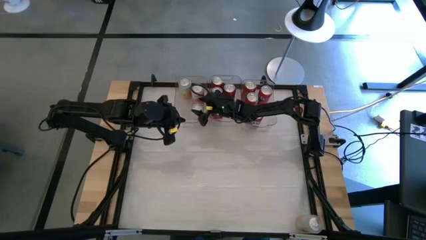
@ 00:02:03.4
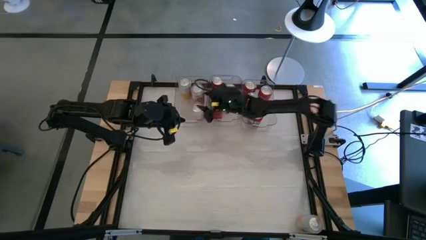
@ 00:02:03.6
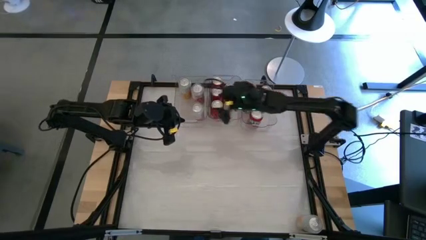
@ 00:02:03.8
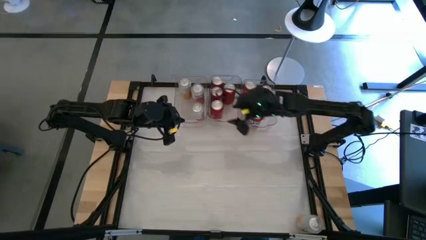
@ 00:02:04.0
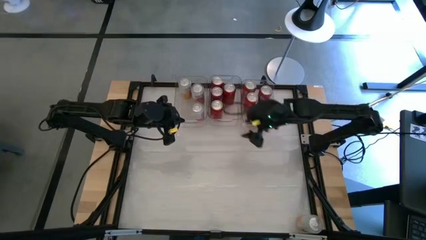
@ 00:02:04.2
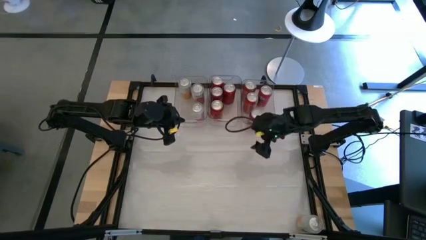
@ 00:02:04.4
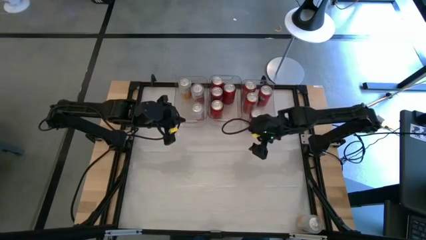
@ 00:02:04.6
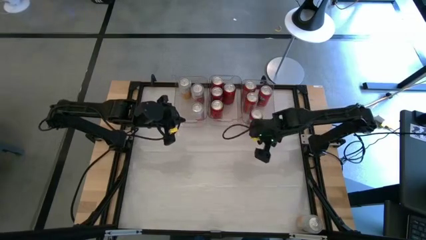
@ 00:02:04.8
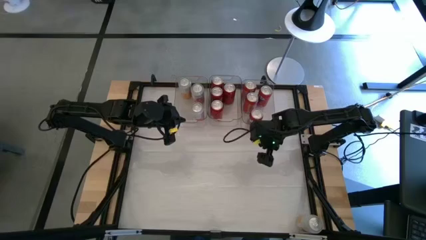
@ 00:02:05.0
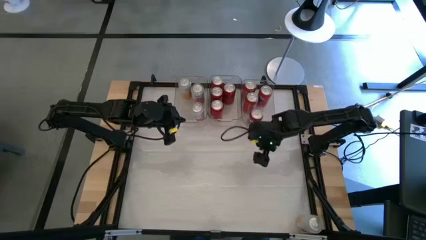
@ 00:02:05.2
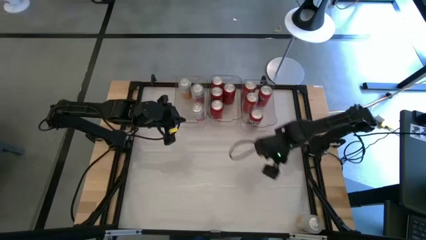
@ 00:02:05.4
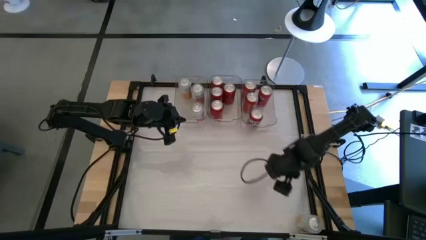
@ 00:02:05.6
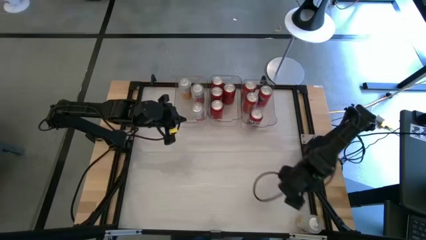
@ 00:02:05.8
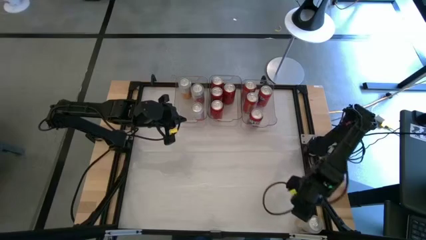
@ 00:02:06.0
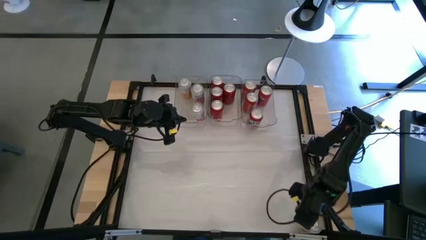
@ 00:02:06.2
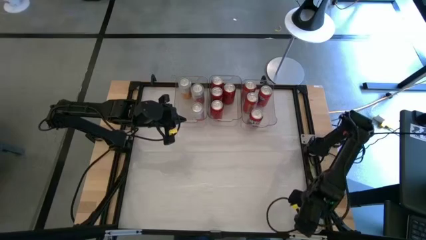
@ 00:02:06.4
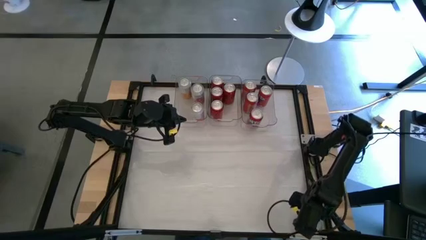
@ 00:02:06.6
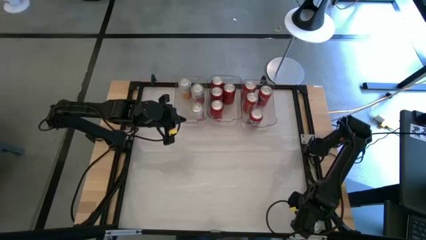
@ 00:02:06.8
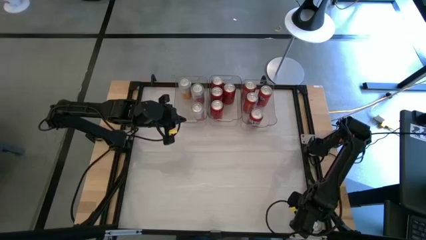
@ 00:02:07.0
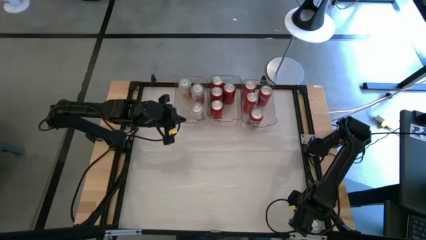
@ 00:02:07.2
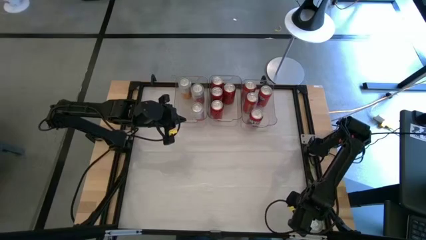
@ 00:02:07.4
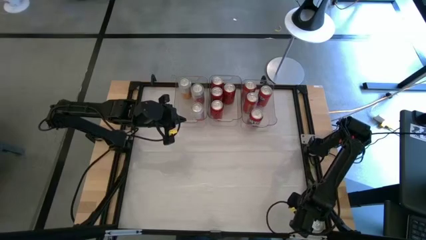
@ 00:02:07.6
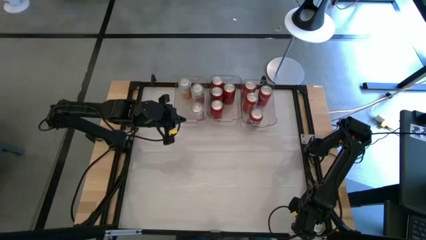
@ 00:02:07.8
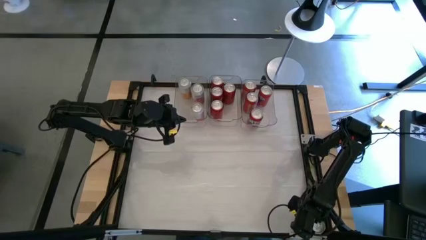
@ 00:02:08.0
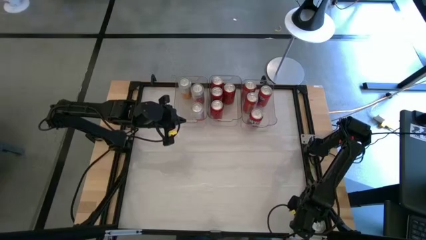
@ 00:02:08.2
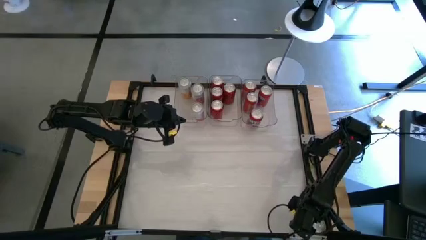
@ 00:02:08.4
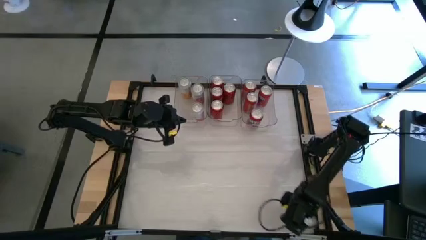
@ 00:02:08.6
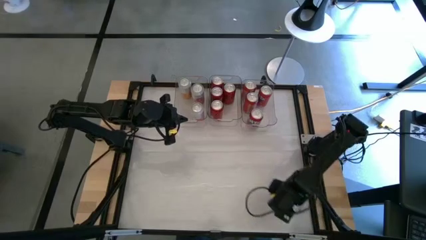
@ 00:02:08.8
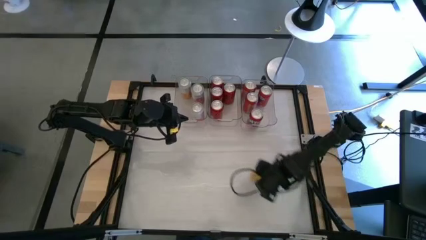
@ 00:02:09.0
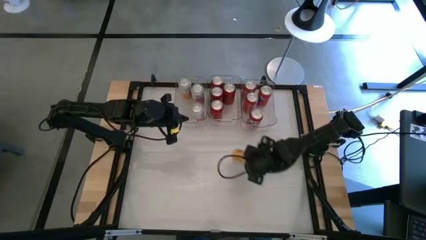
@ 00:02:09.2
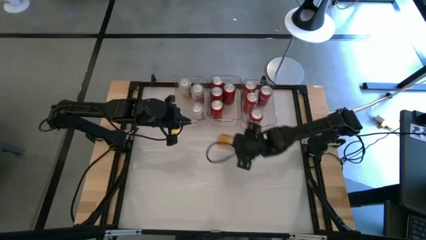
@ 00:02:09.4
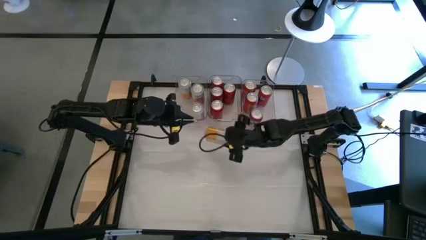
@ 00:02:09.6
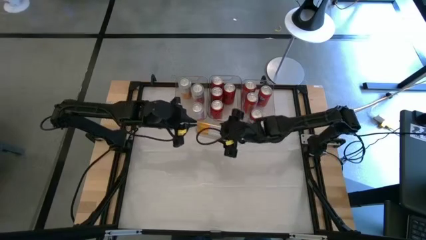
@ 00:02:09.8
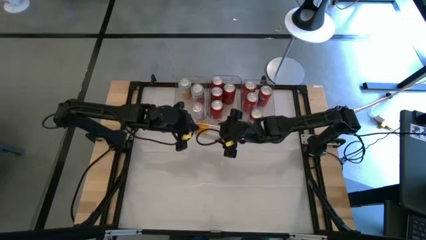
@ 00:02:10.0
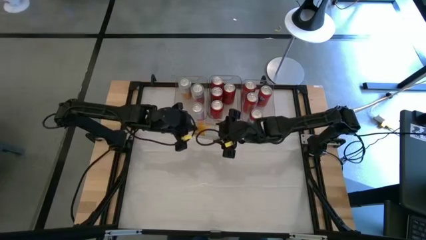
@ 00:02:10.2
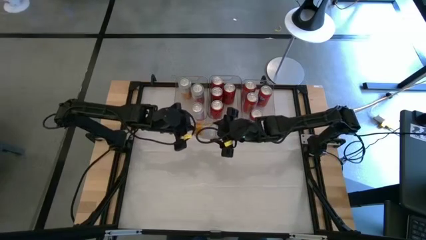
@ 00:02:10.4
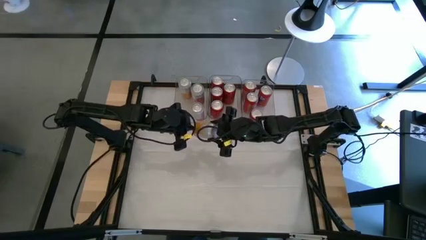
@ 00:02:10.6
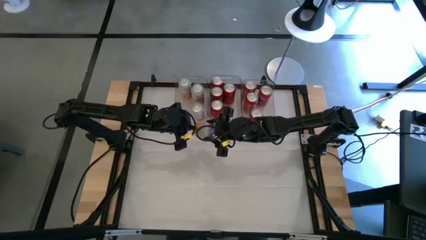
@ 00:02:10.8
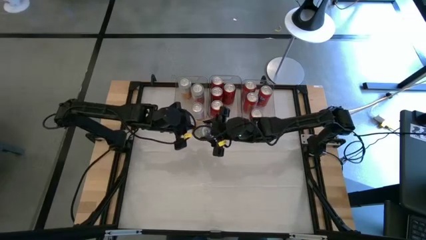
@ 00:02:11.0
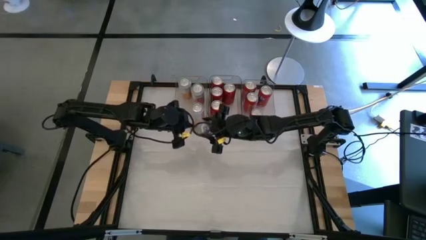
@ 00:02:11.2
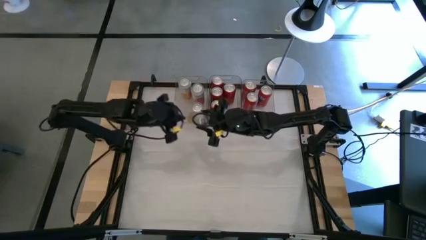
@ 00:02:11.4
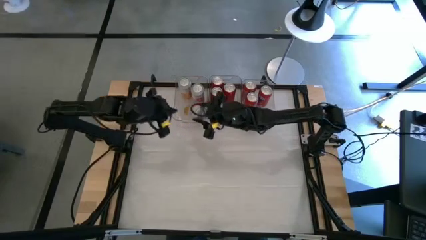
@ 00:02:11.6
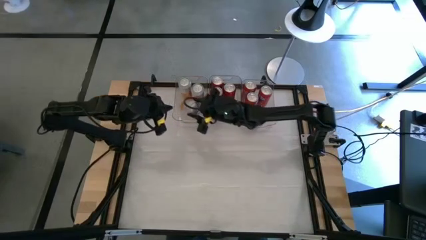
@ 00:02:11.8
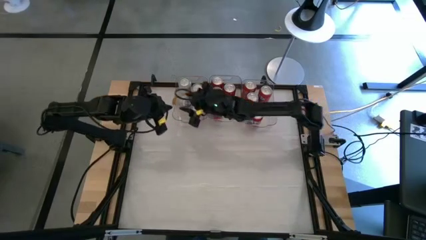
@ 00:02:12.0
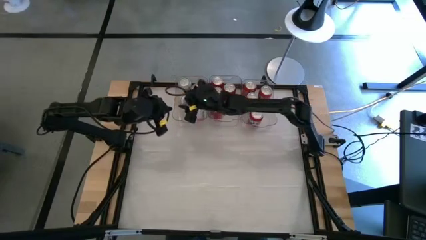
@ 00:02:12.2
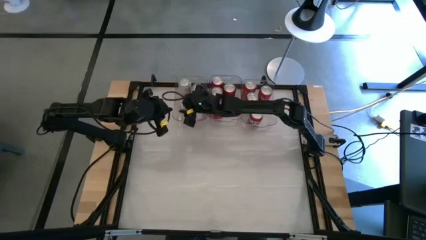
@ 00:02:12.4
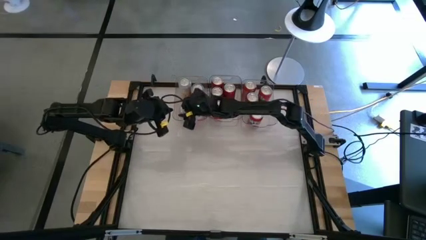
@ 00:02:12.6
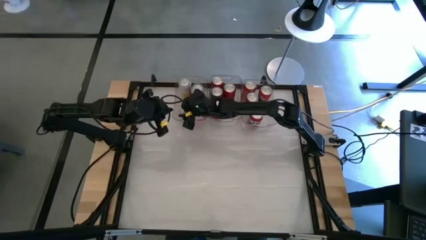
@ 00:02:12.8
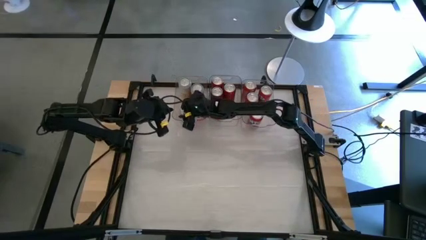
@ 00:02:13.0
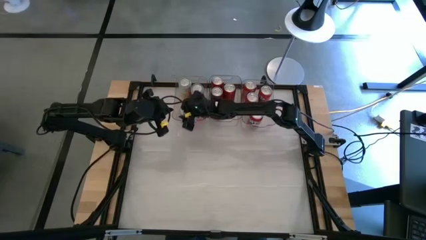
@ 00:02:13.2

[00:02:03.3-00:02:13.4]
Task: Sort soda cans
Put the yellow-white soda can into the left transparent bin
